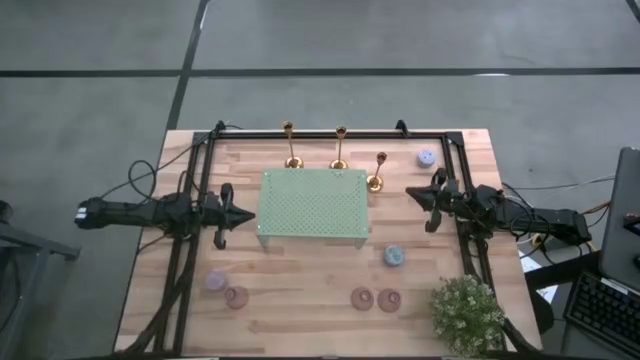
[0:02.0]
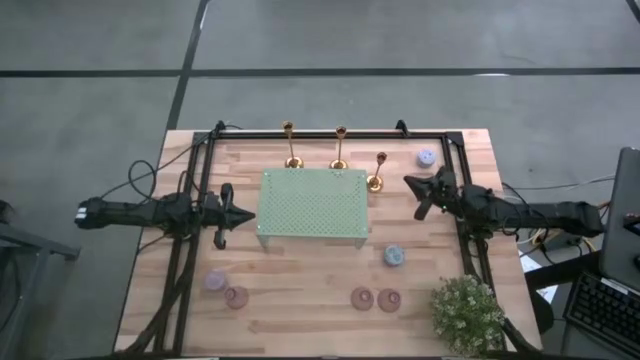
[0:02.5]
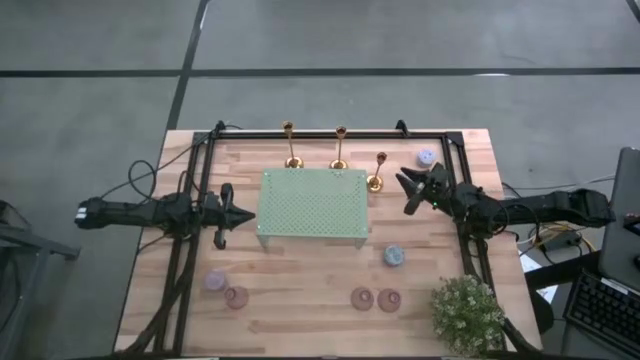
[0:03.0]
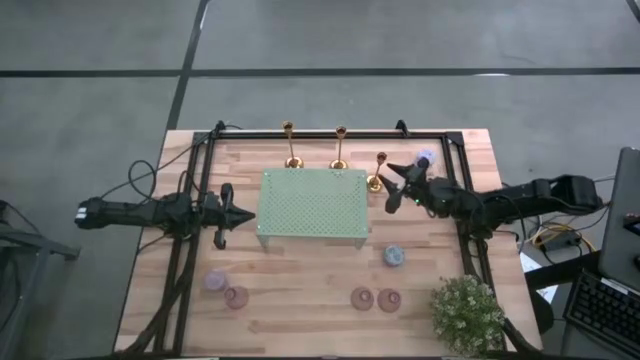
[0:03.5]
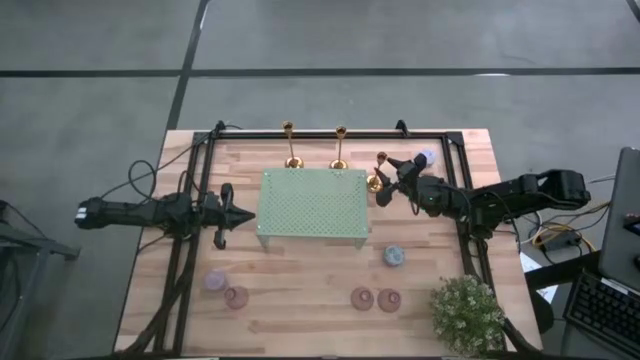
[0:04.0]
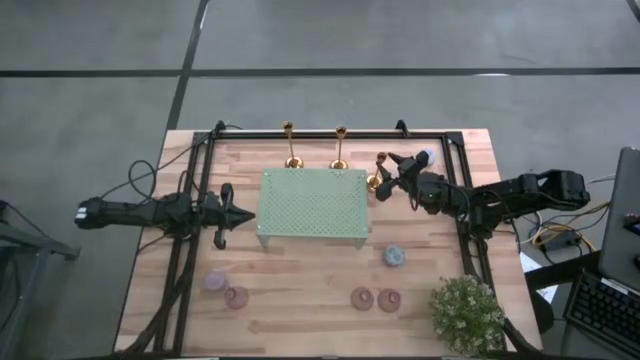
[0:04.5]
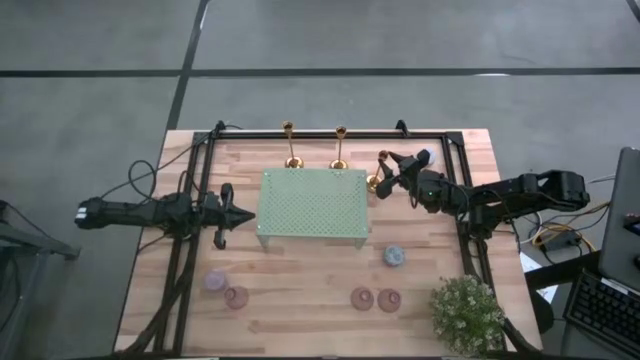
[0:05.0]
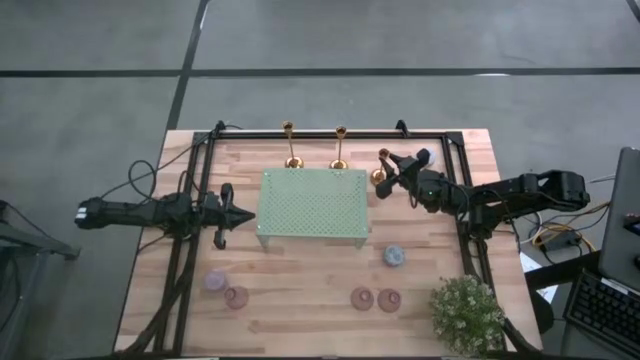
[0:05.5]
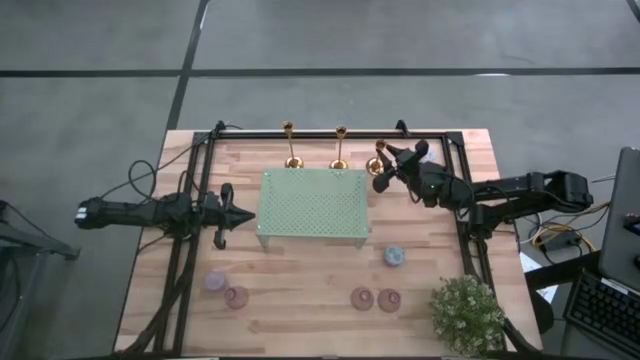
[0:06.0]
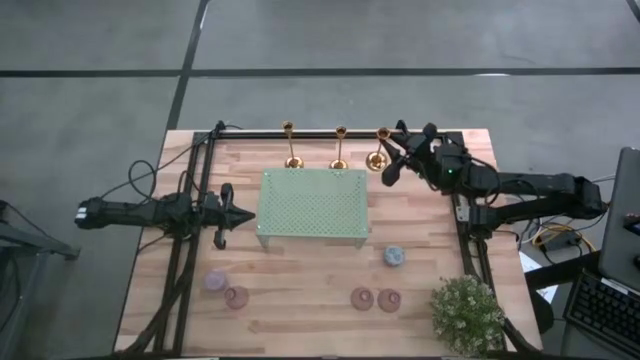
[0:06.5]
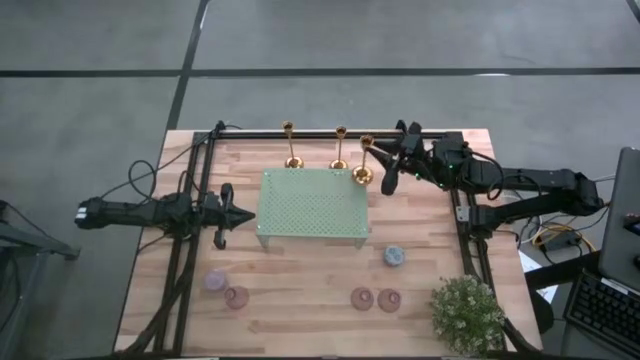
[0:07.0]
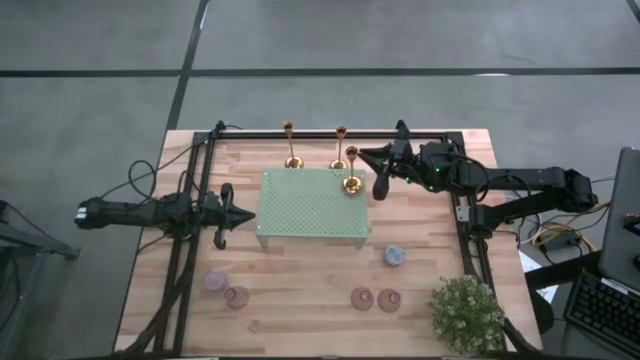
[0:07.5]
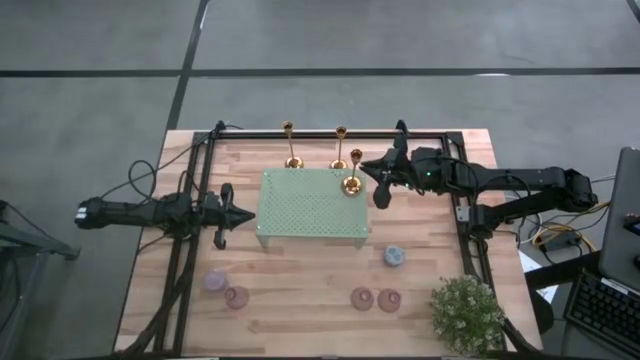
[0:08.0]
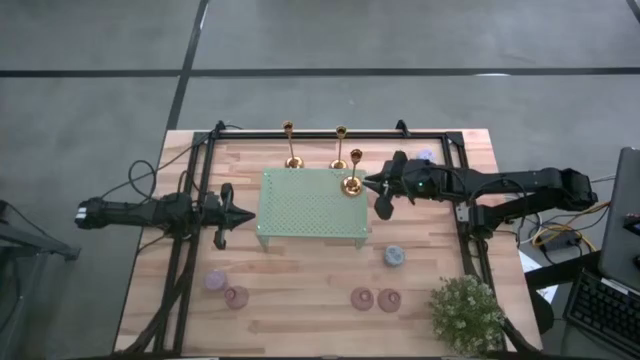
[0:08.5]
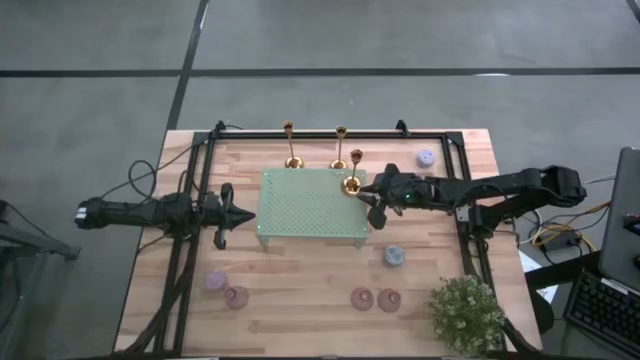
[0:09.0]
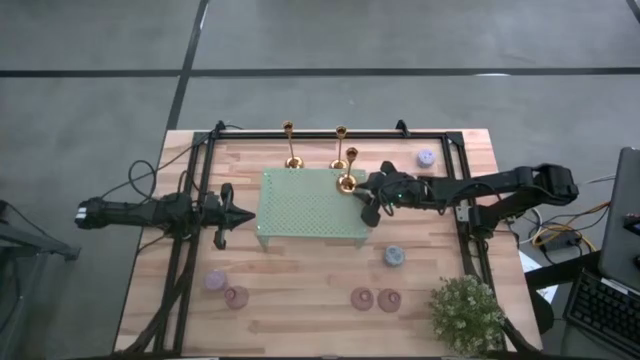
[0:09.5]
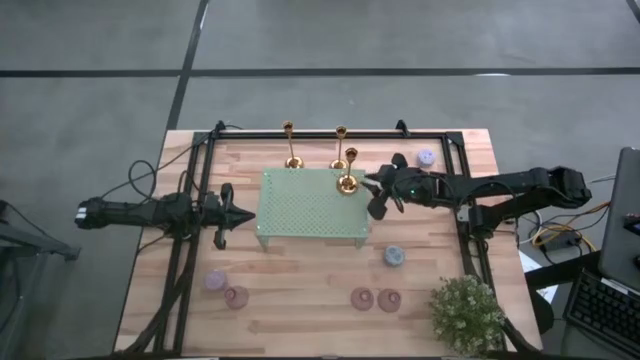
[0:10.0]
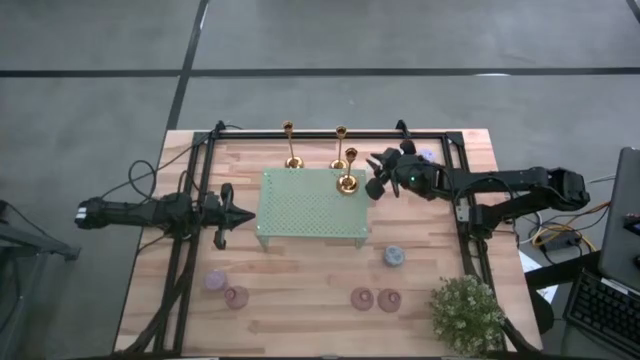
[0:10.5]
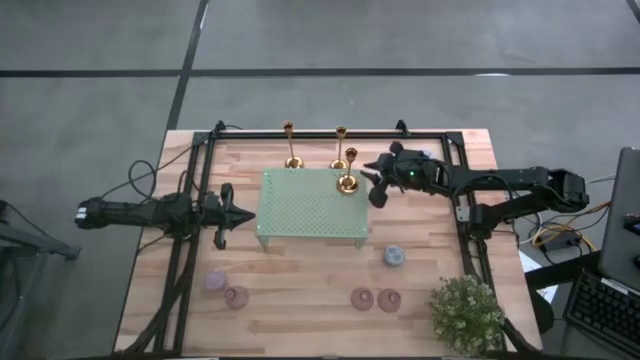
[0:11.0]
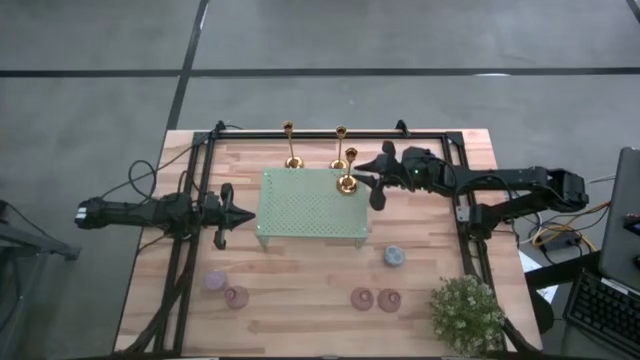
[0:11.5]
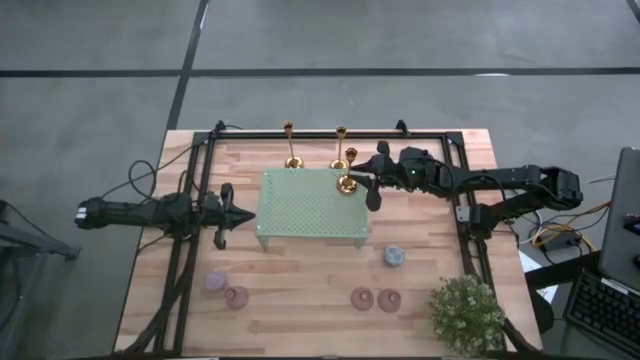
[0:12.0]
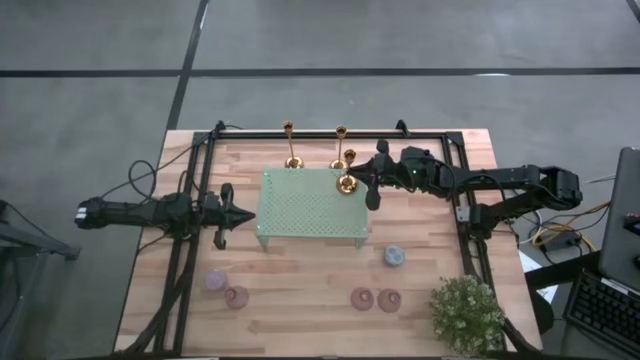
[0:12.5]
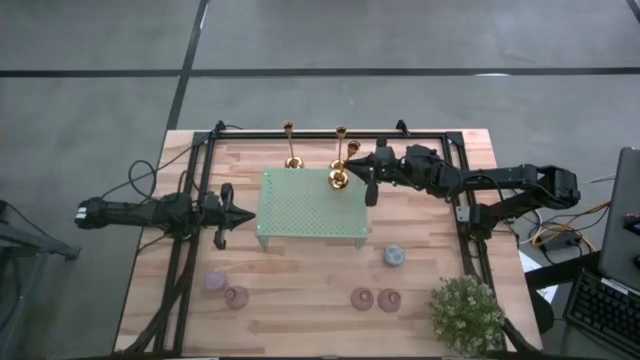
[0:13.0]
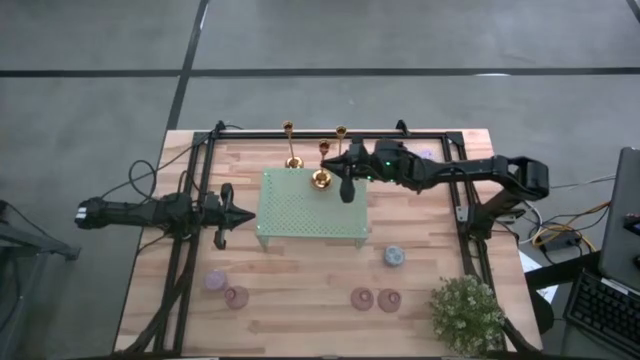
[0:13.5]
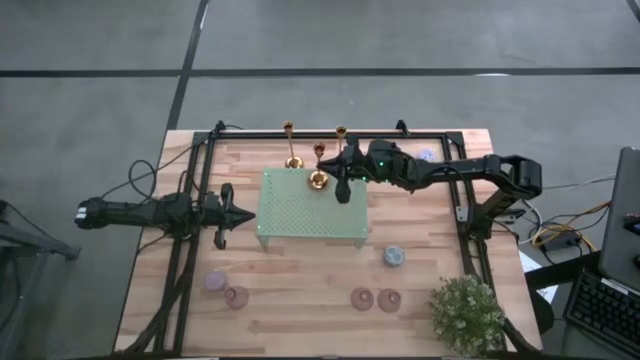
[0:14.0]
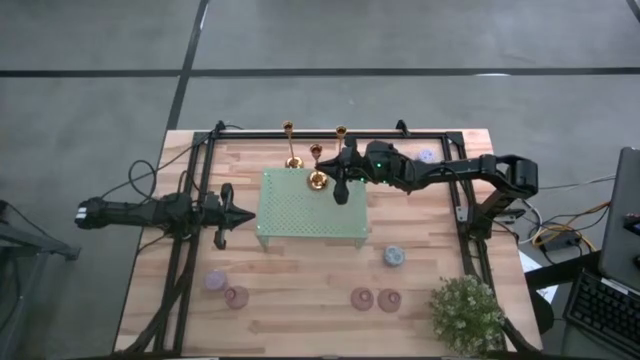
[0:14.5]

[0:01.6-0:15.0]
Task: Pick & Place candle stick holders
Put the right gold candle holder on the shelf

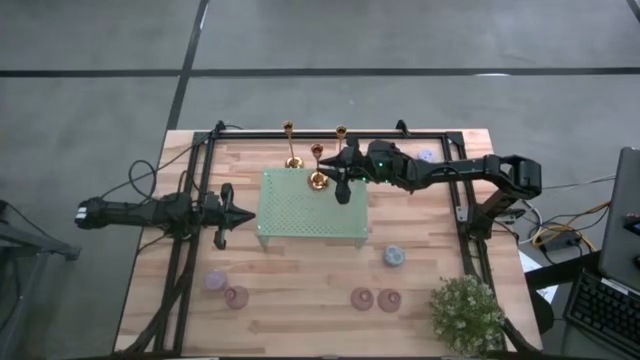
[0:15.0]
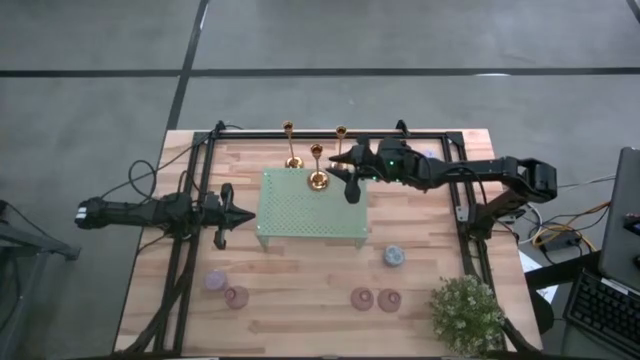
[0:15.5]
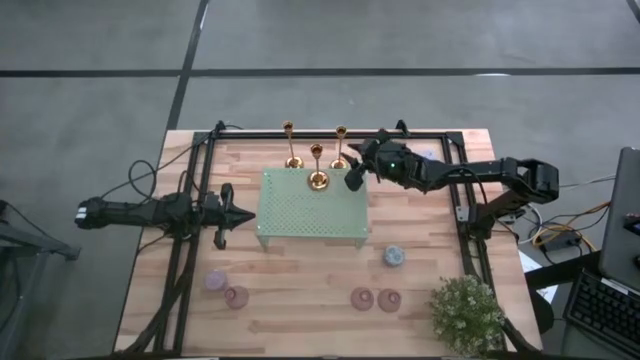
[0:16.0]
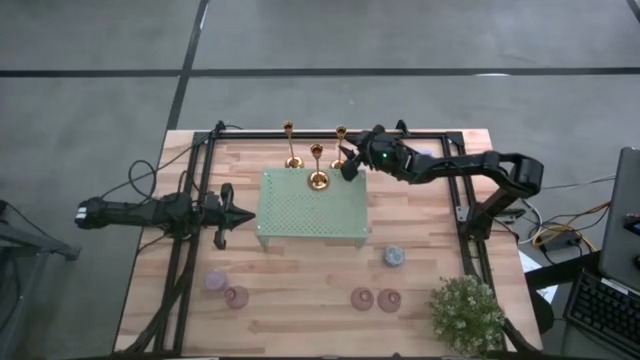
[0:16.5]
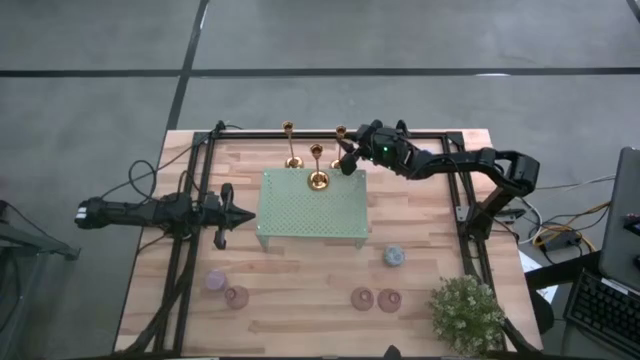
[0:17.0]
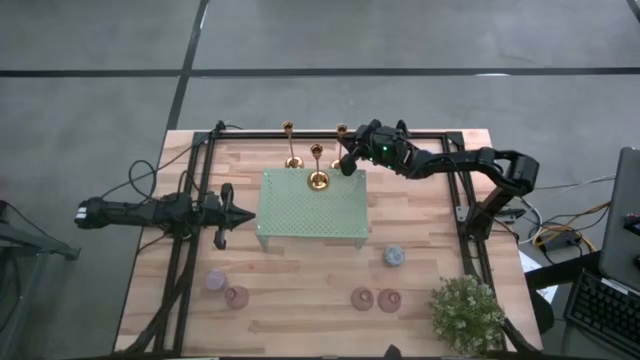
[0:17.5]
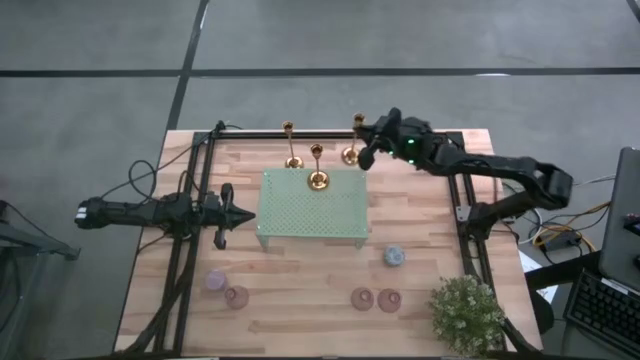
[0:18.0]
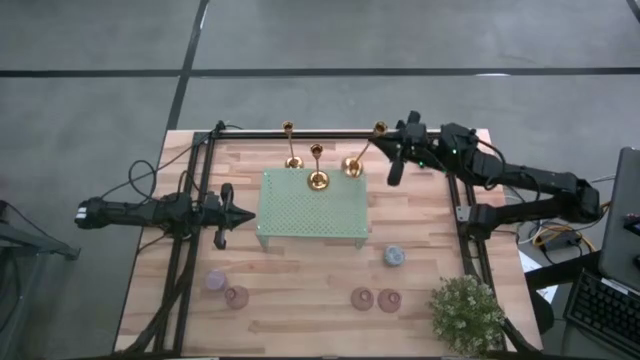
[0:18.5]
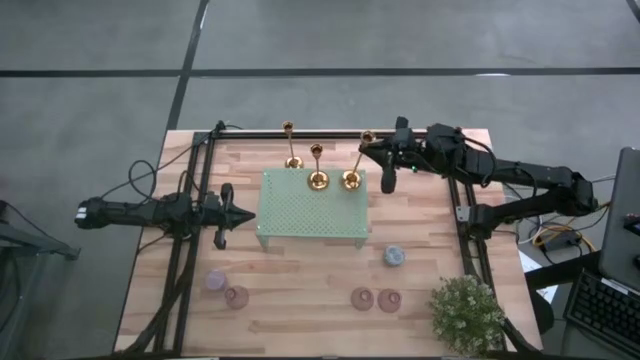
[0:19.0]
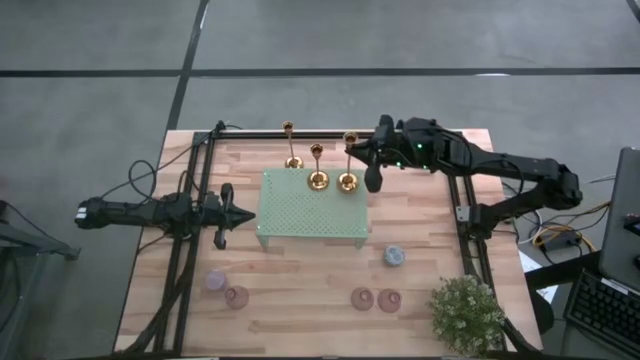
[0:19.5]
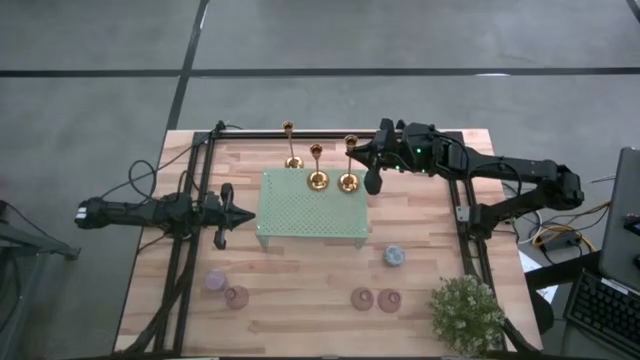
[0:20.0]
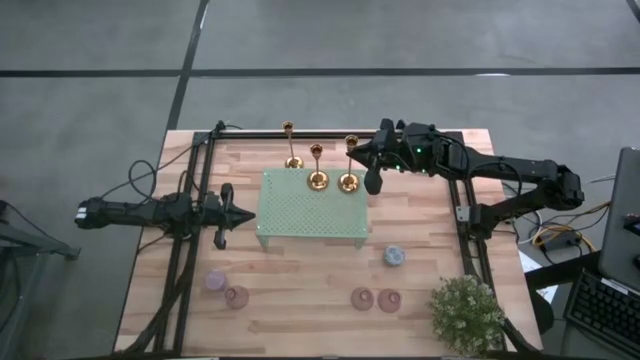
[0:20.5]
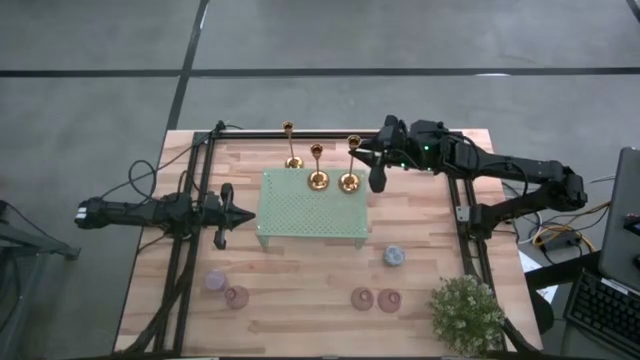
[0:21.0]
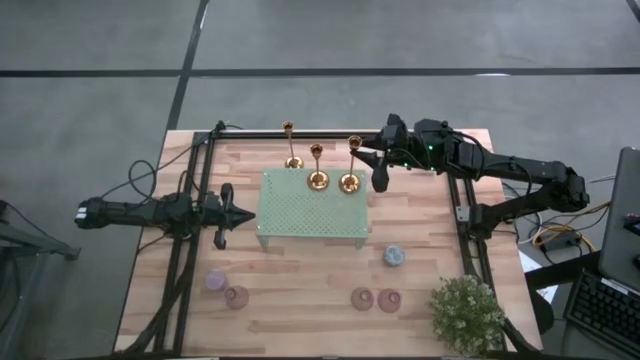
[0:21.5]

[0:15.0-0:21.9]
Put the right gold candle holder on the shelf aligned with the other gold candle holder
